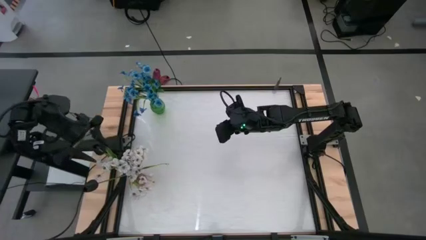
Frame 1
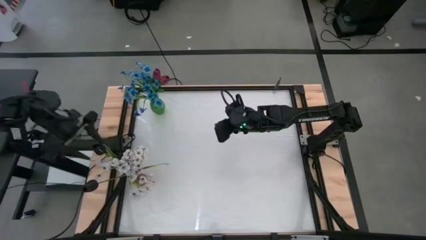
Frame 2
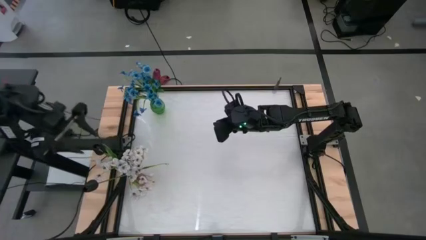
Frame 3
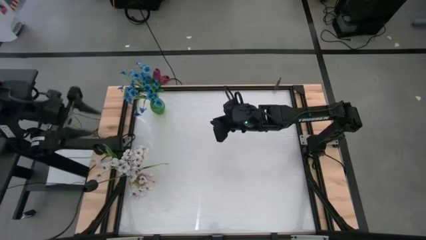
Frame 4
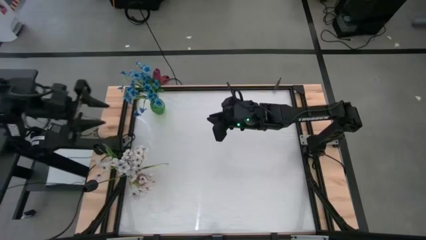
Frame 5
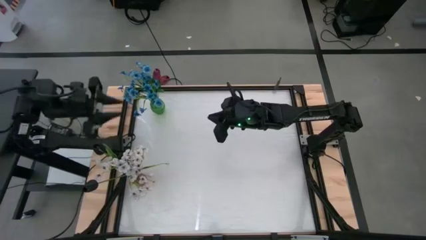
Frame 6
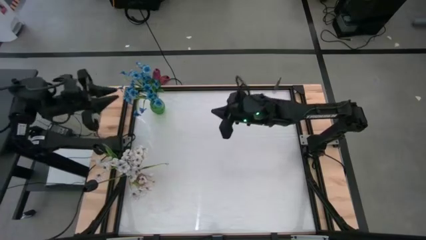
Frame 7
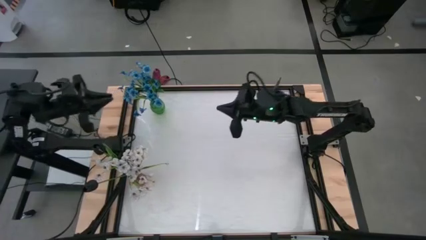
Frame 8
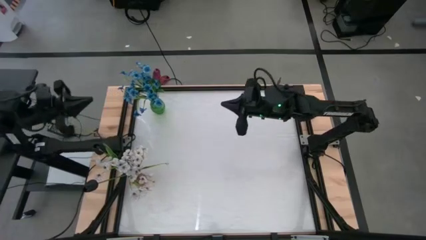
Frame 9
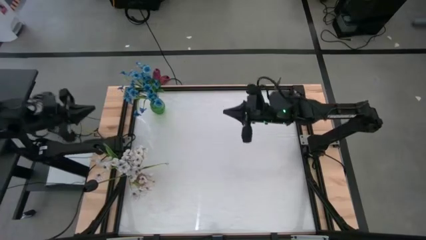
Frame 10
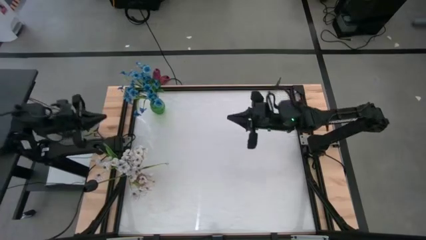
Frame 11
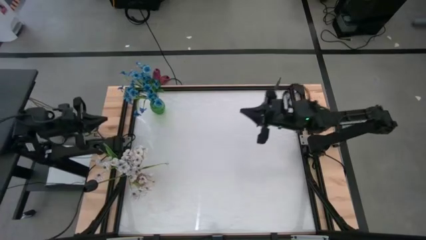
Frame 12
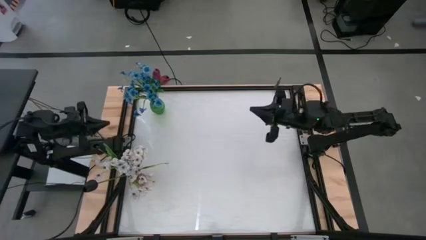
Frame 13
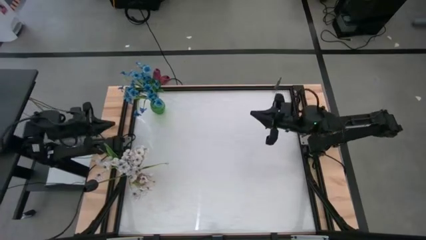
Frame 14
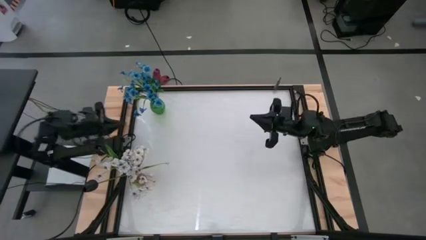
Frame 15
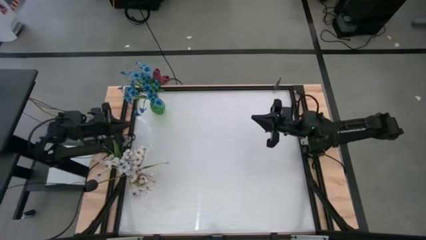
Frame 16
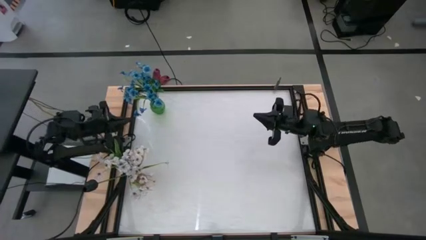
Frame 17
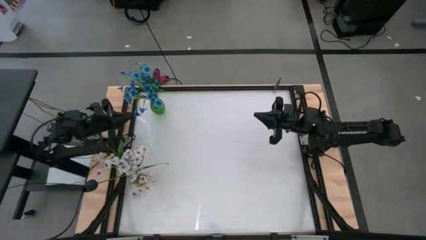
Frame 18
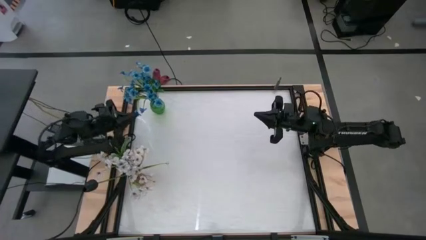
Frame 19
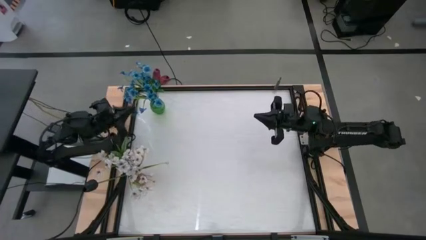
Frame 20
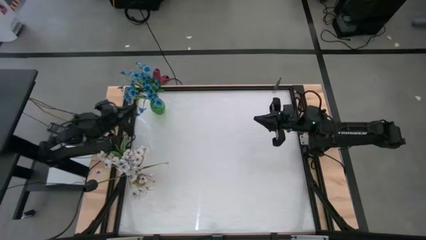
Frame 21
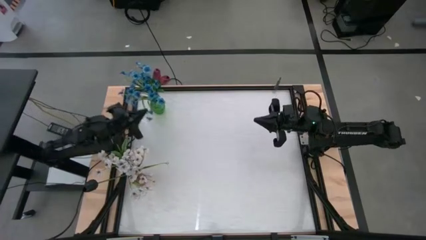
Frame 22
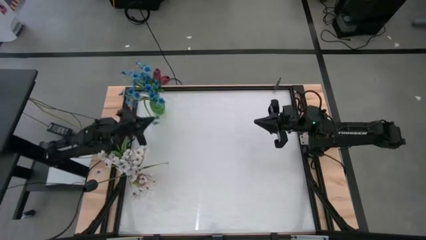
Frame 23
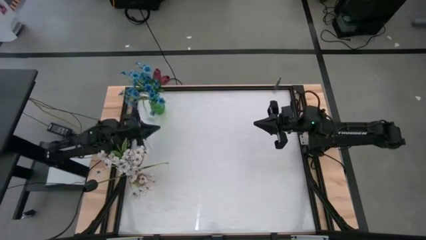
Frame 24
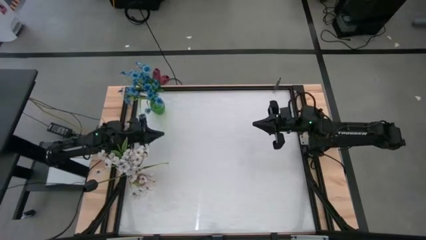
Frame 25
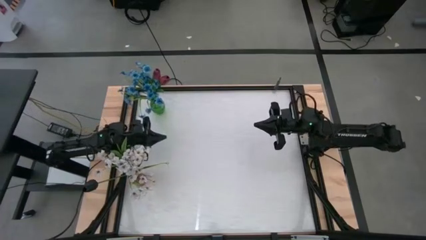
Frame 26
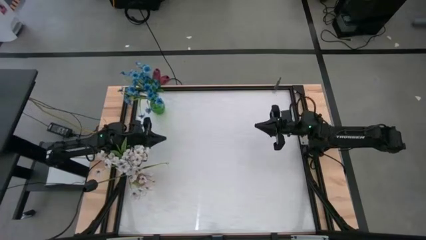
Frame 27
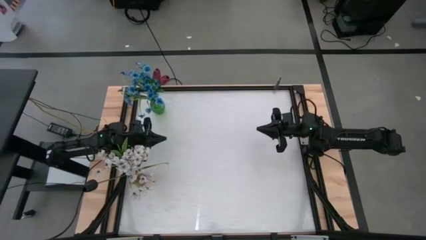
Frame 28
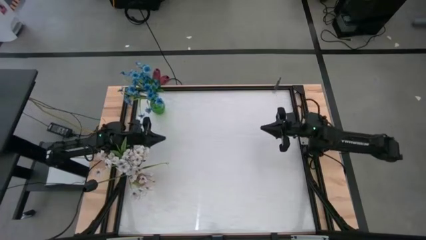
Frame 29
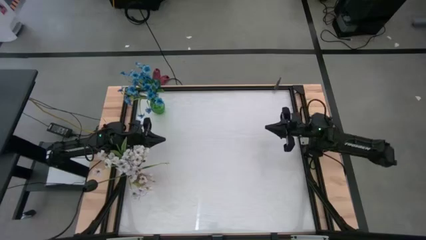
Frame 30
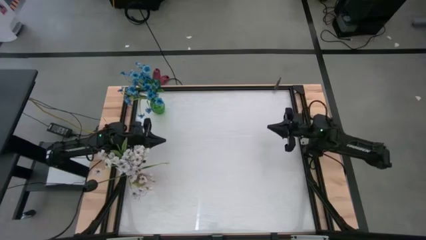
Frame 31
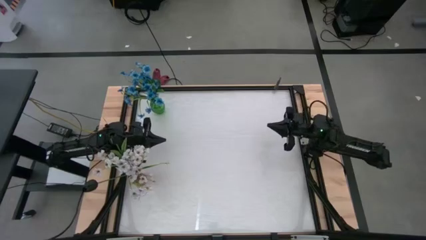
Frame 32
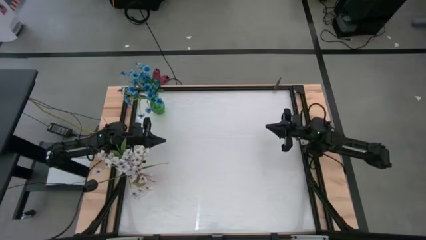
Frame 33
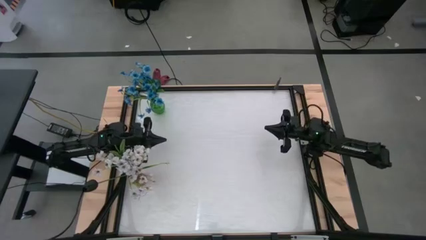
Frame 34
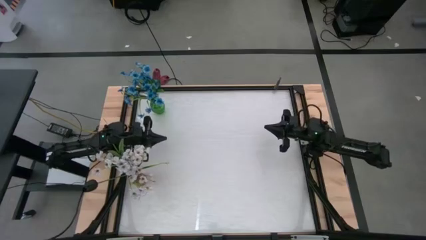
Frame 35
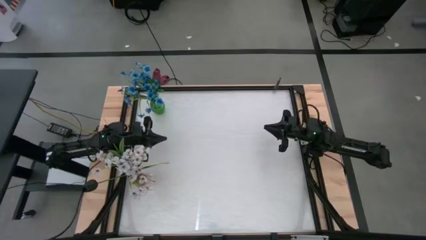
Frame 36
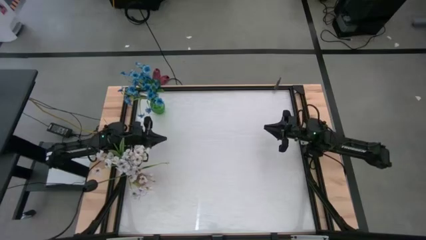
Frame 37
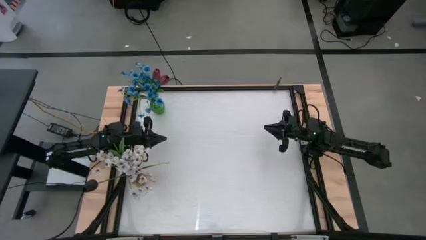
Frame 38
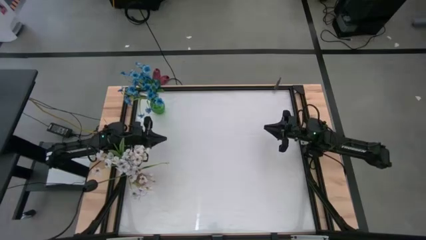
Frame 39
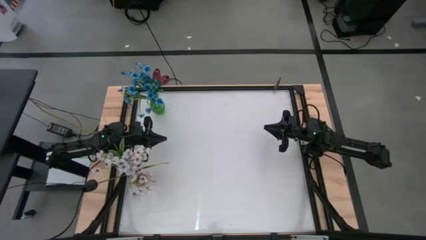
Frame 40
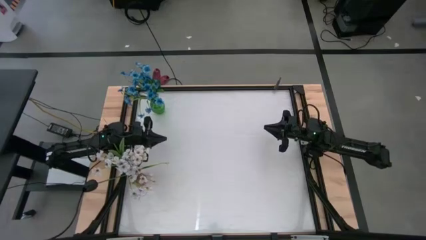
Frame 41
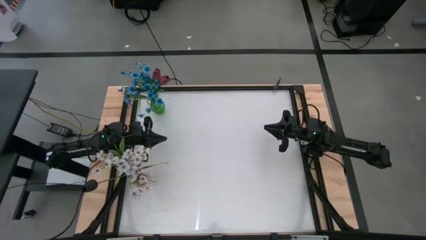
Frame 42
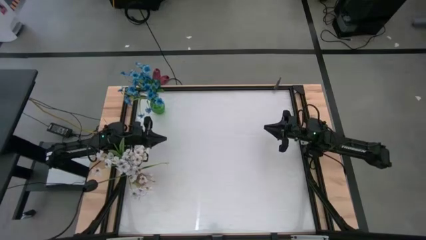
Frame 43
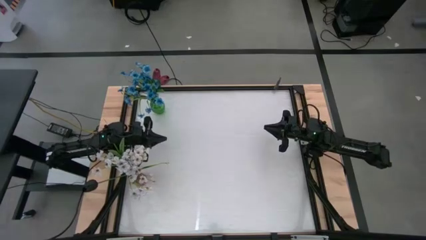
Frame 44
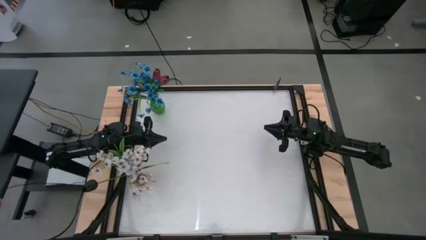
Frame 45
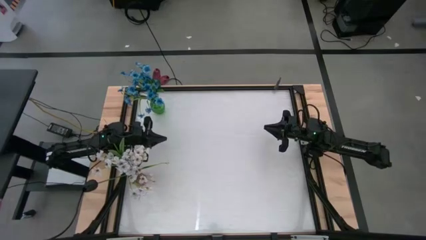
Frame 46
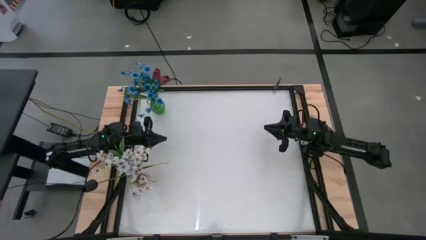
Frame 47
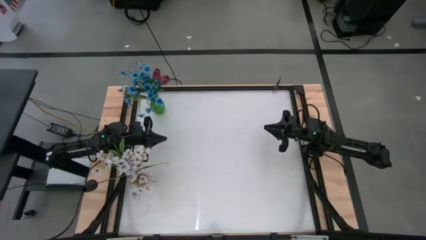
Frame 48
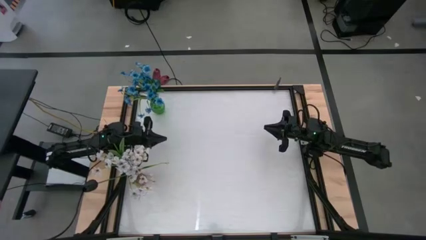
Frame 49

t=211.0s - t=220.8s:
Task: Sort flowers into vase by color
Return to Home Position

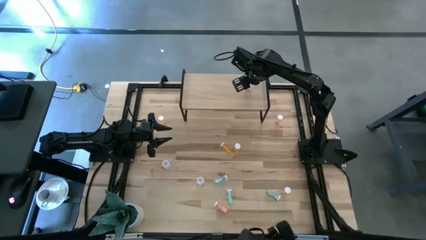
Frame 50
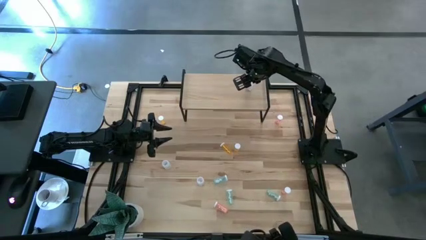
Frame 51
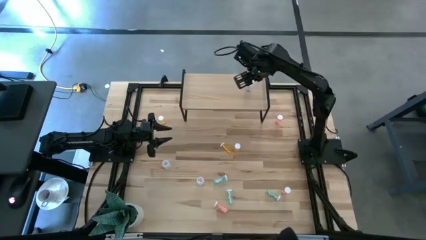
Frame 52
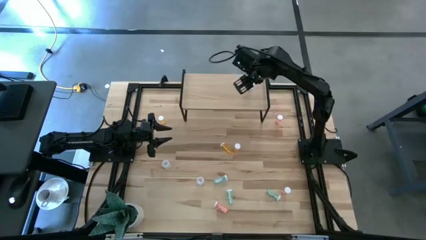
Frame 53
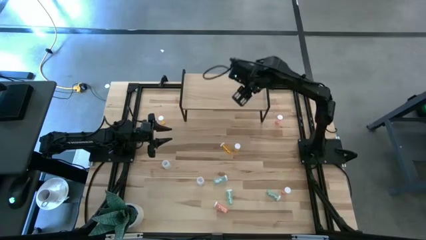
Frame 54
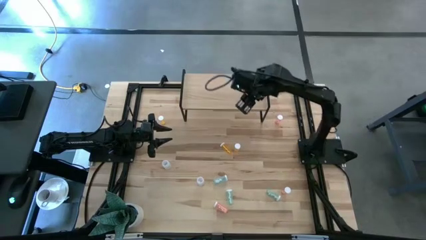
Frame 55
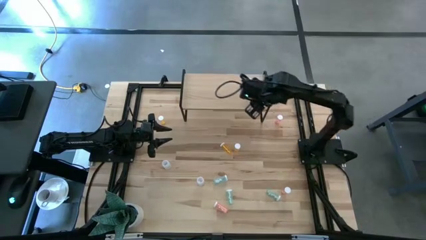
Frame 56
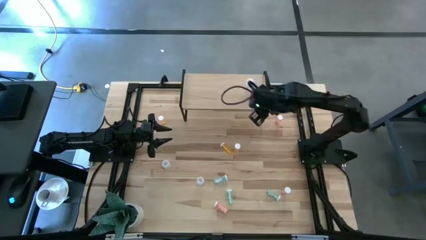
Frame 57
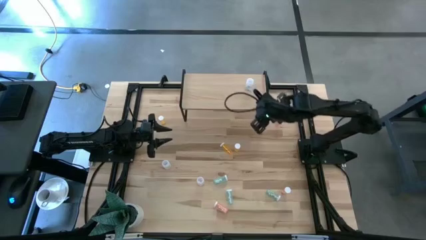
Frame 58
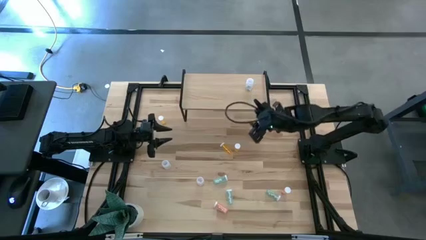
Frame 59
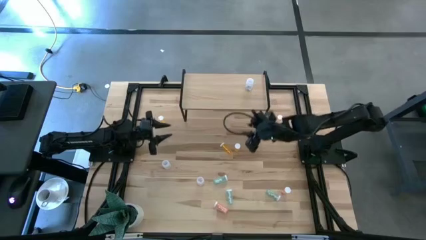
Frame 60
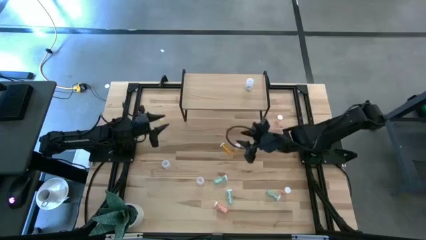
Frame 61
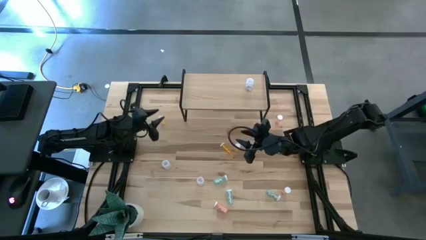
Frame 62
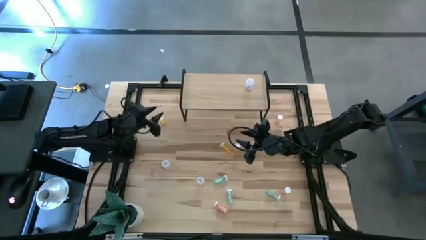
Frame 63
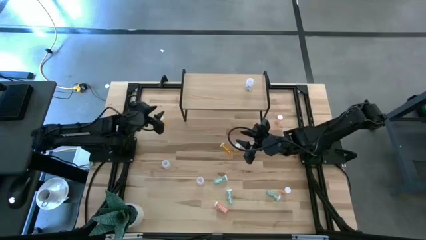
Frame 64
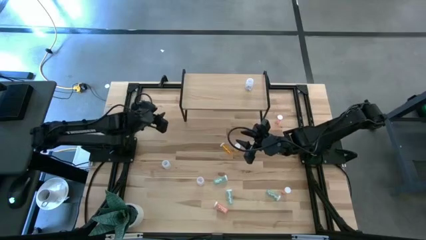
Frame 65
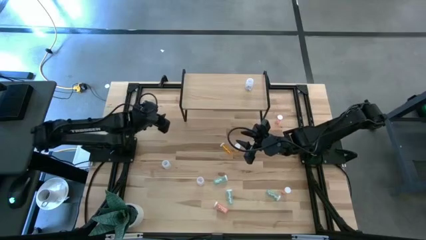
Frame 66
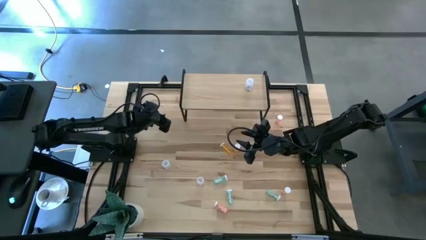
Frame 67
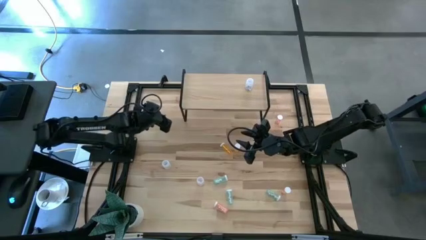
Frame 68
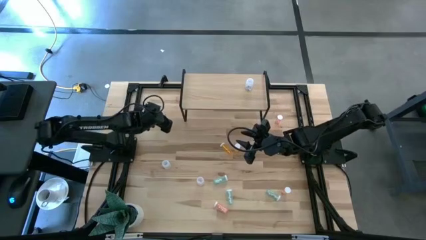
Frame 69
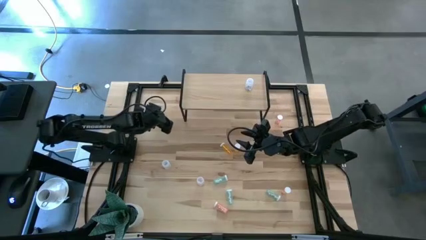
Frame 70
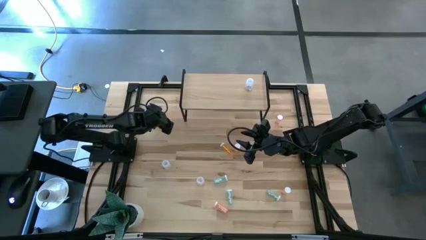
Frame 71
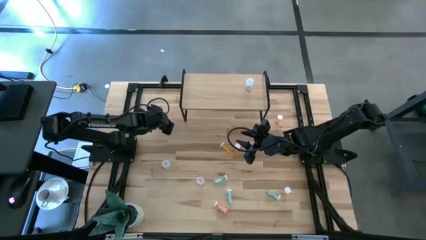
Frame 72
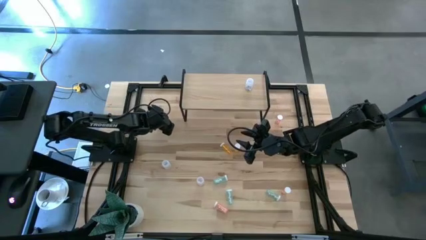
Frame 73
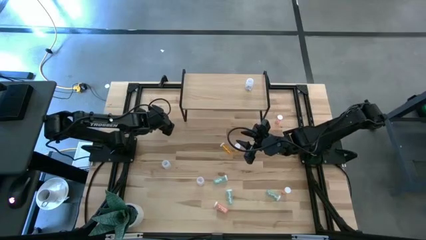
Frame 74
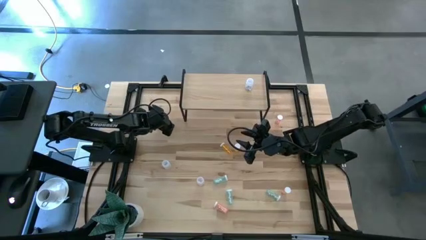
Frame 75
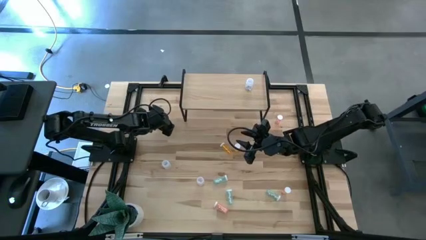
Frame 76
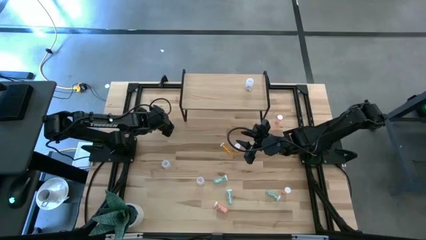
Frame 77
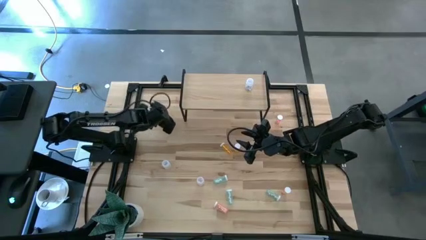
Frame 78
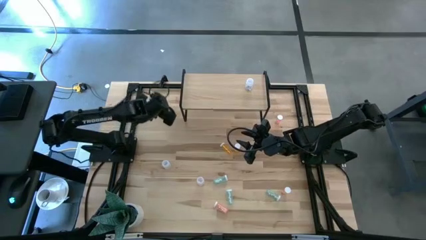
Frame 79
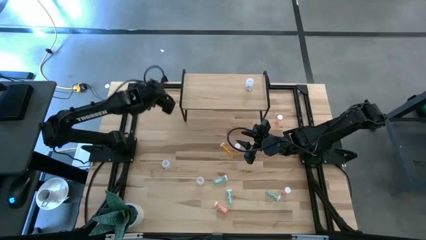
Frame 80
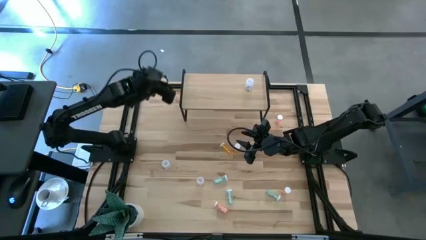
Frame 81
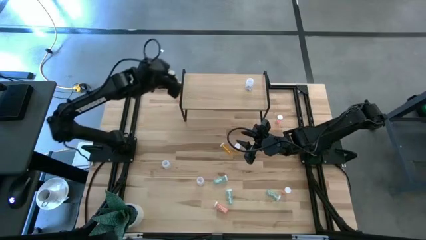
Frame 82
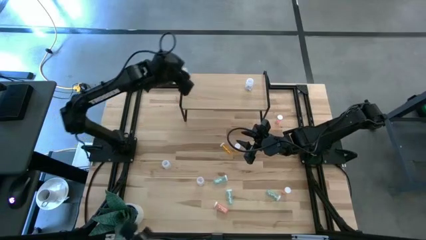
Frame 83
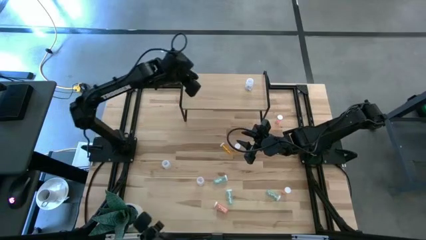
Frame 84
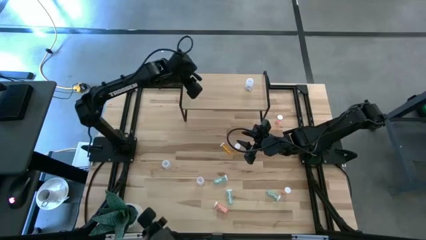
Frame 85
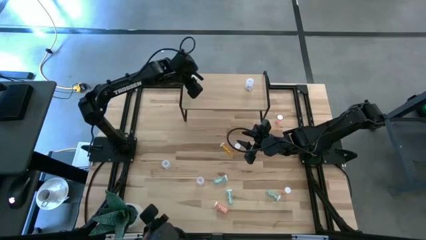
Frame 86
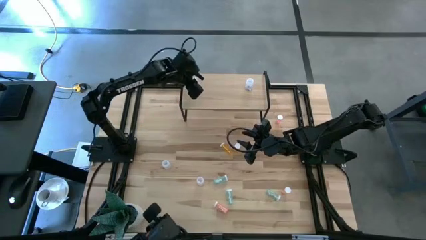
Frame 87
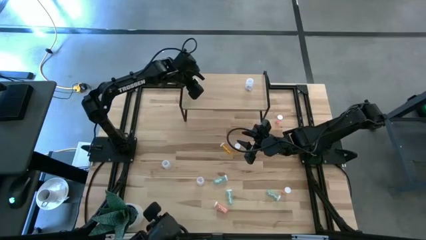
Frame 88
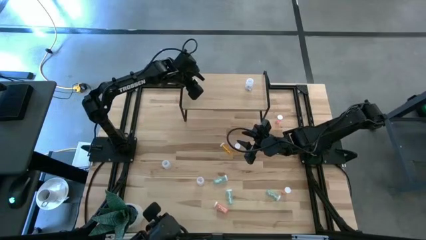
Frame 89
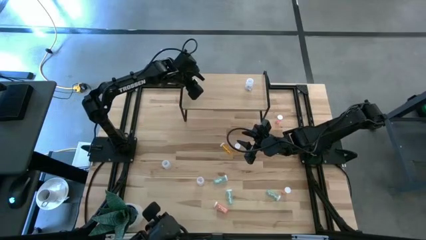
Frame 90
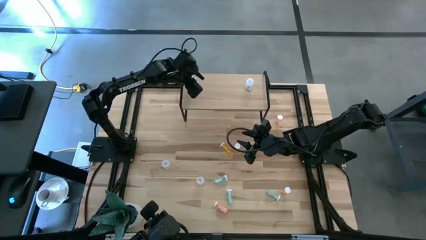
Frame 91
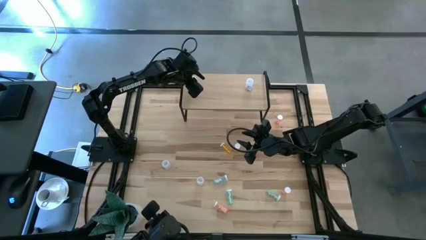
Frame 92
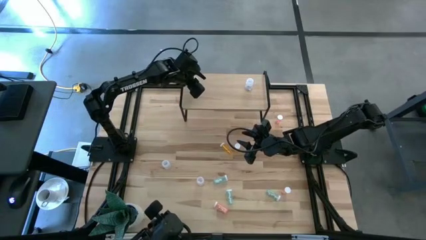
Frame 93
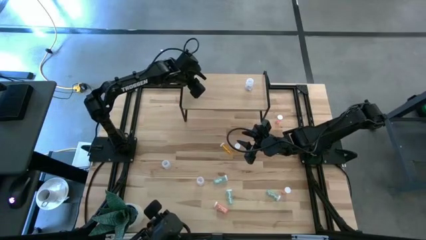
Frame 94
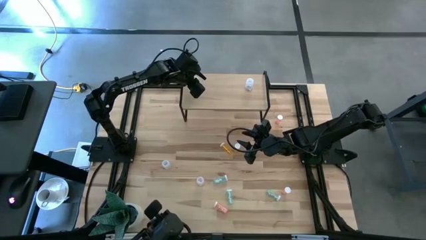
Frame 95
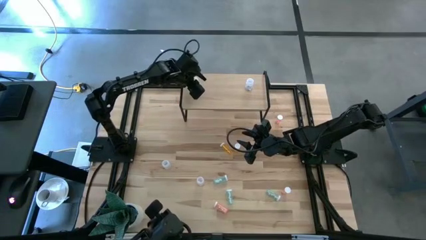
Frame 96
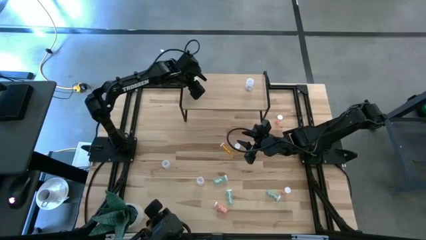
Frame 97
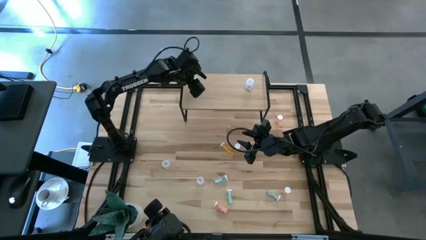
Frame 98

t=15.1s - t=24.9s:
Task: Pick and place medicine bottles onto shelf by color
Put the orange pill bottle on the shelf
